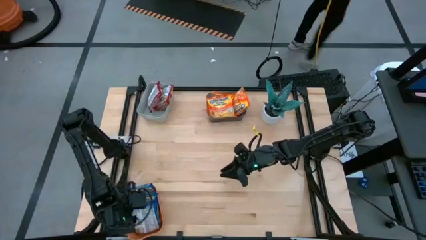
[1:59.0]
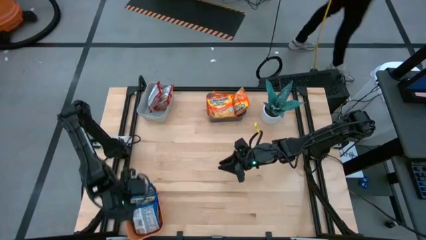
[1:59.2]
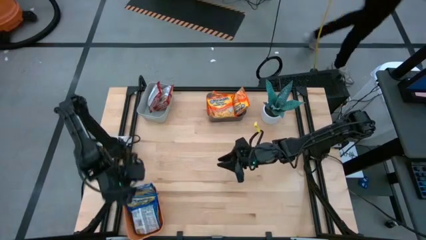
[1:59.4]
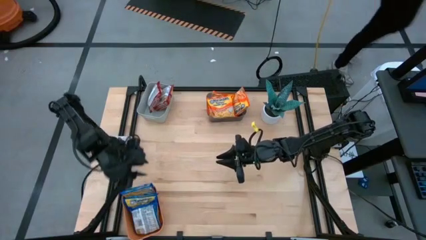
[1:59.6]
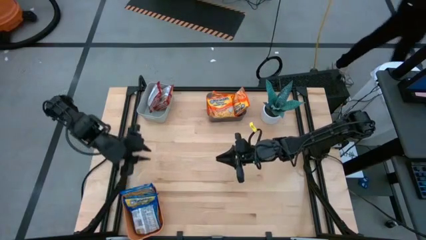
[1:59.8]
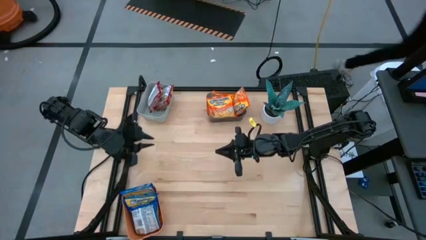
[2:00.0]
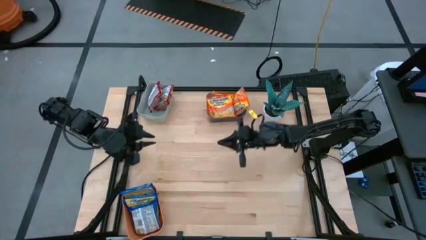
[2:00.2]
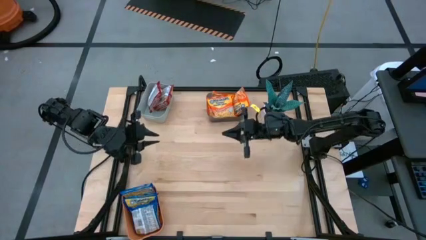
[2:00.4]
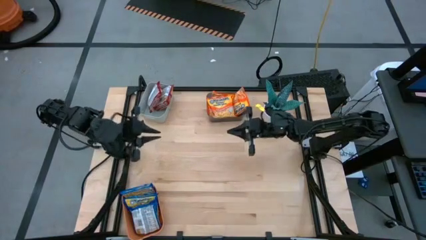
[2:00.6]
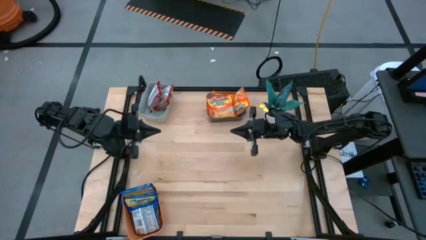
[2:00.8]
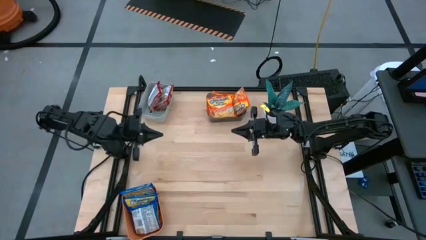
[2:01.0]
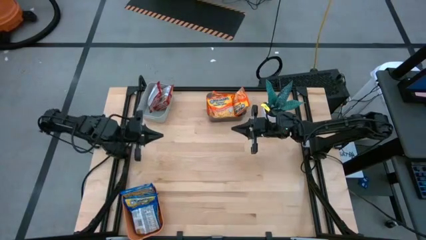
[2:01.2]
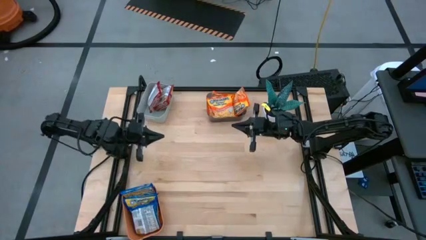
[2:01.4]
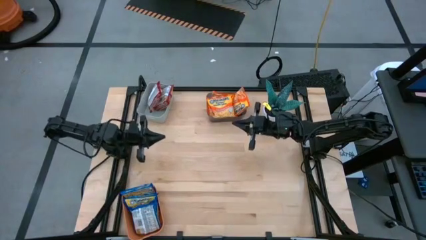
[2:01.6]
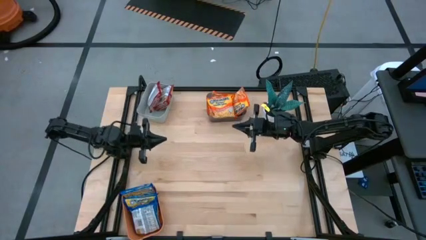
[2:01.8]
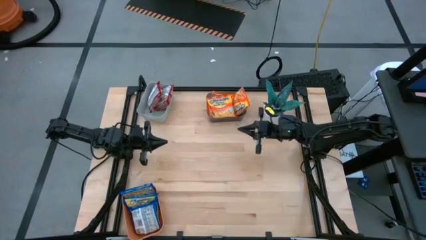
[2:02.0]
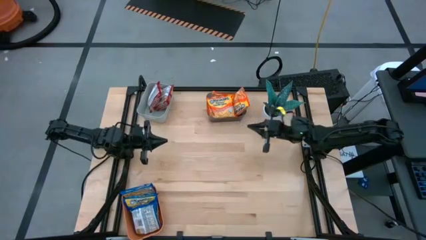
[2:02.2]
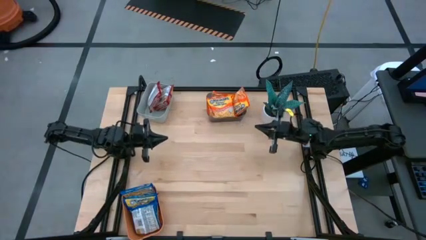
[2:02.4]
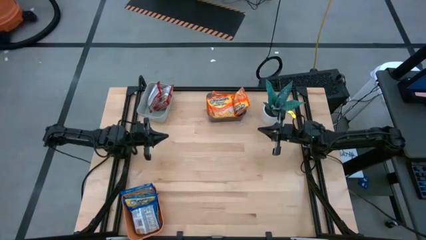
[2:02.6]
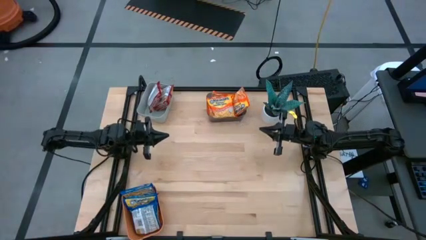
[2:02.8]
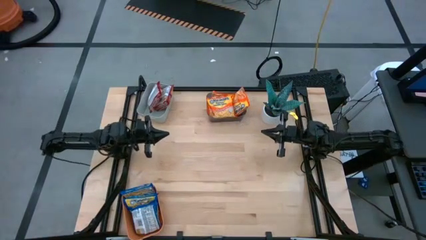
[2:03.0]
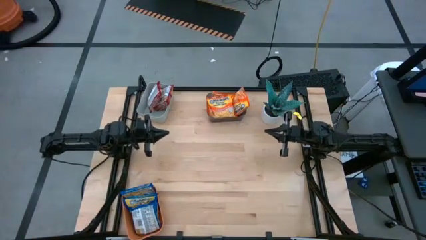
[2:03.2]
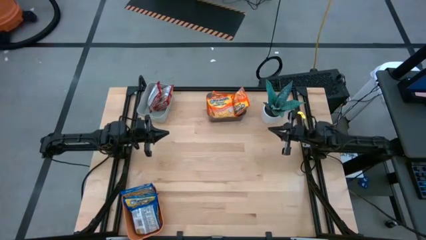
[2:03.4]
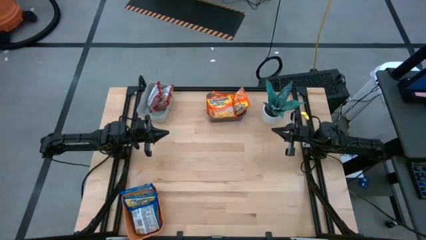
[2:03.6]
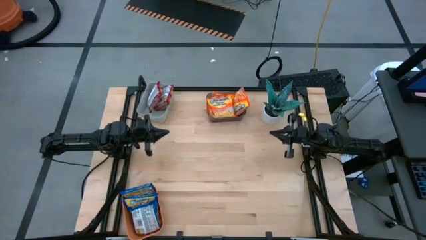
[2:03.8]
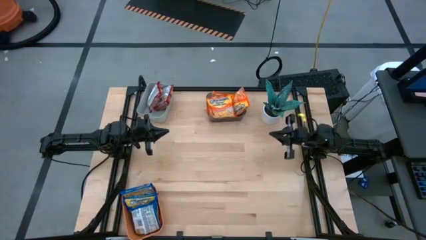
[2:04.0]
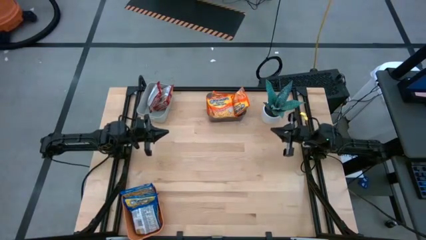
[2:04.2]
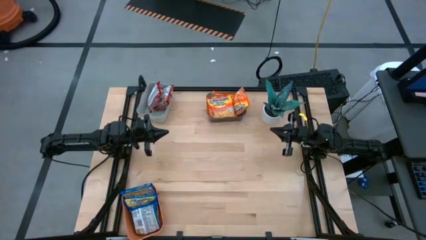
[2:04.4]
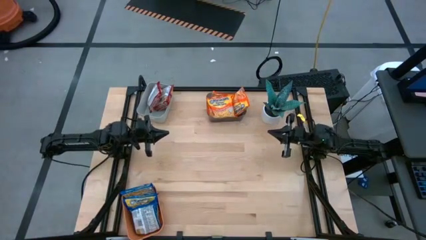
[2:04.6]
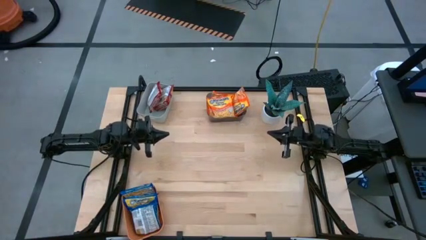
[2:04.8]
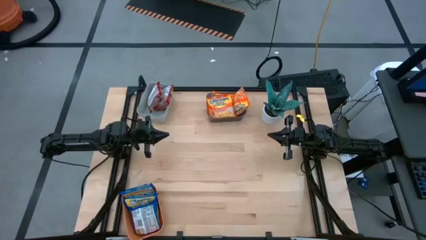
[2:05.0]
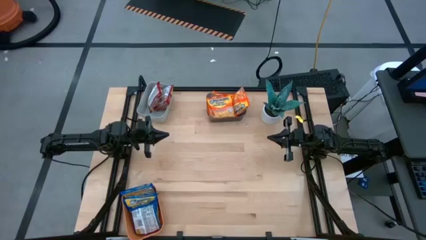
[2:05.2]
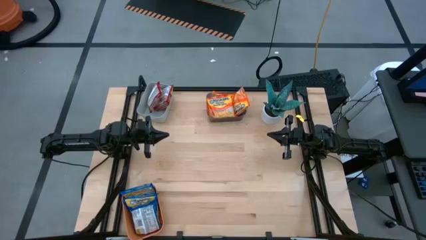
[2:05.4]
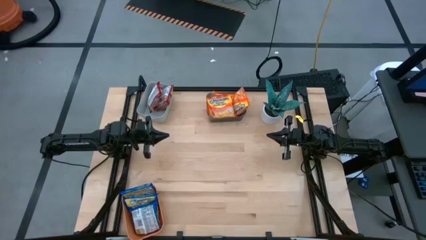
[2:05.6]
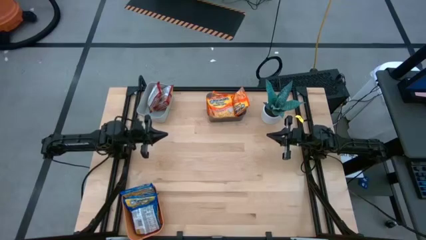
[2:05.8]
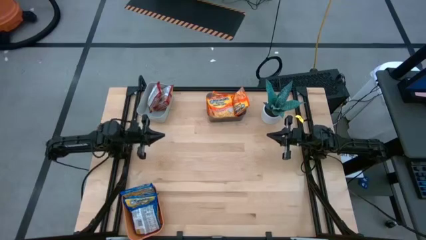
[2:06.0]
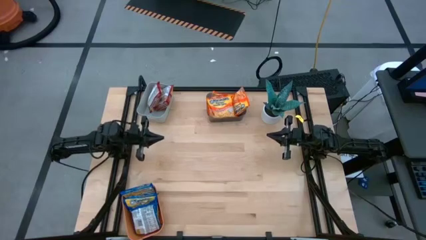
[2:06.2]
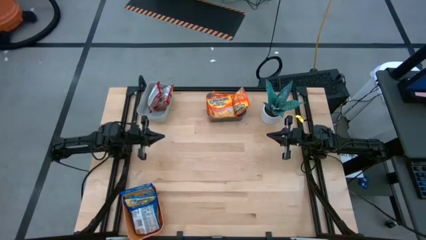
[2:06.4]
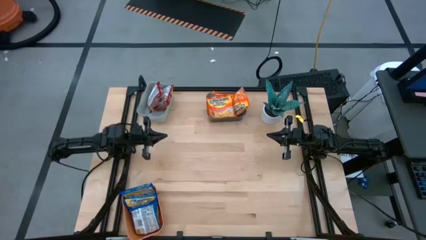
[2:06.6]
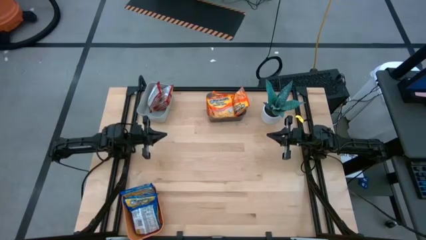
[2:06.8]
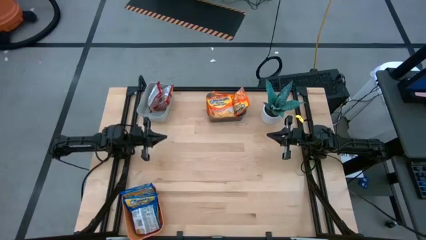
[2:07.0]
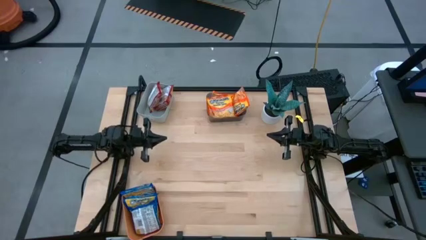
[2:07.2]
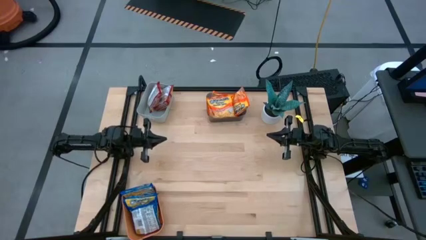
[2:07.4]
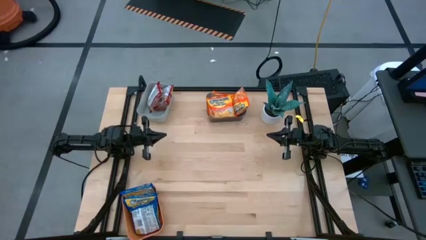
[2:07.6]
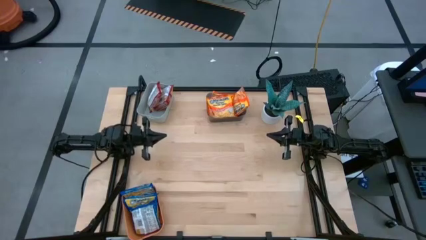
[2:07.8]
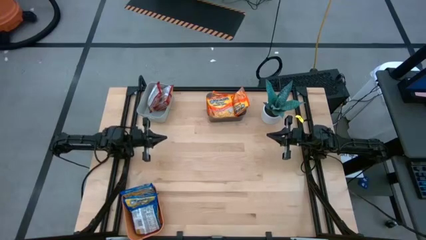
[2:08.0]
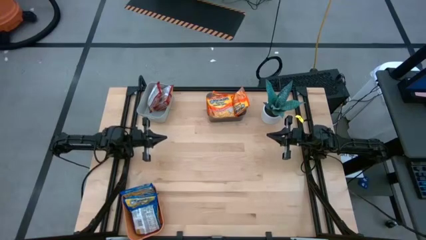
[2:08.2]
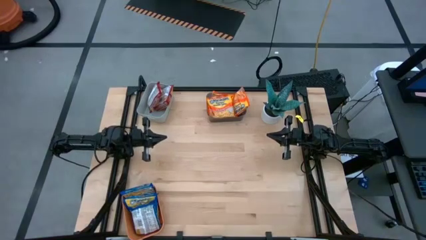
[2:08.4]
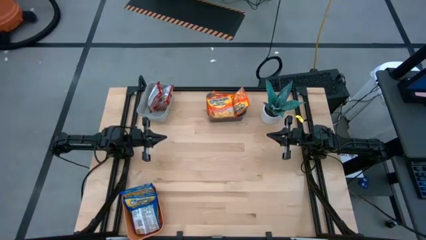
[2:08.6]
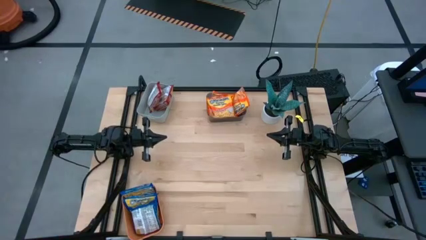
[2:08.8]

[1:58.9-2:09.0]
Task: Sort Maruchan noodles
Return to Home Position

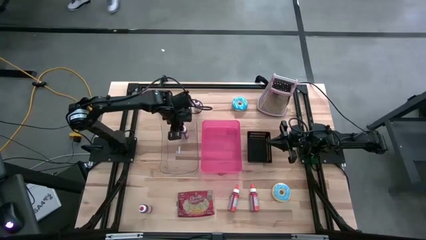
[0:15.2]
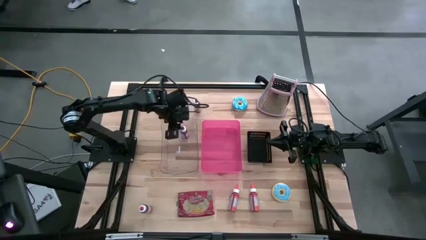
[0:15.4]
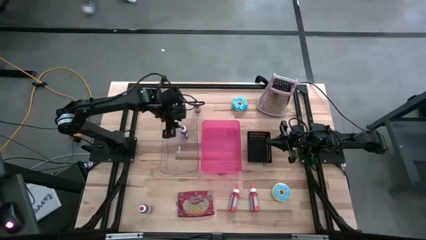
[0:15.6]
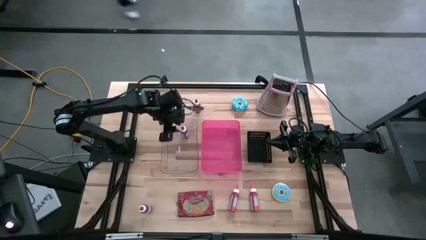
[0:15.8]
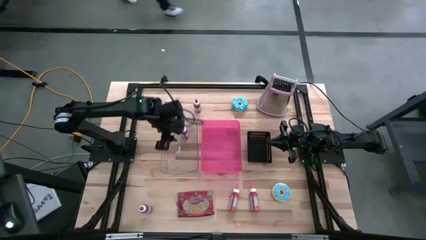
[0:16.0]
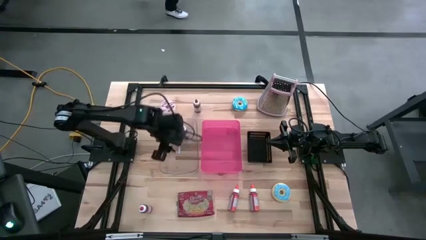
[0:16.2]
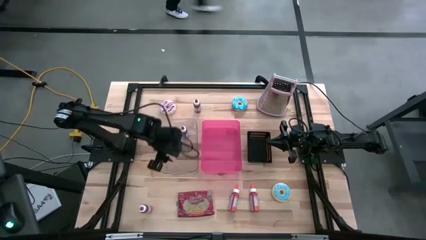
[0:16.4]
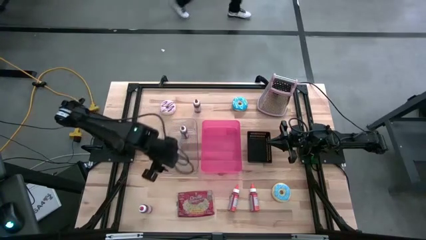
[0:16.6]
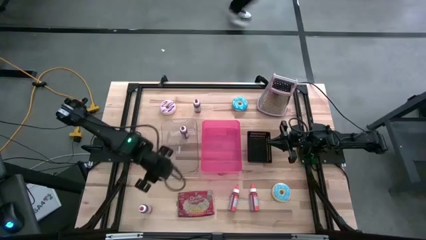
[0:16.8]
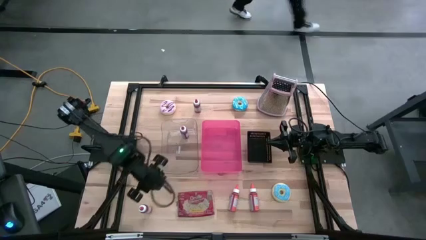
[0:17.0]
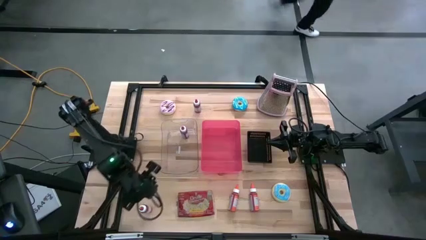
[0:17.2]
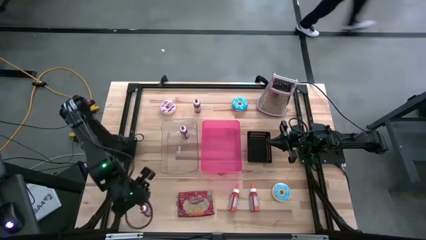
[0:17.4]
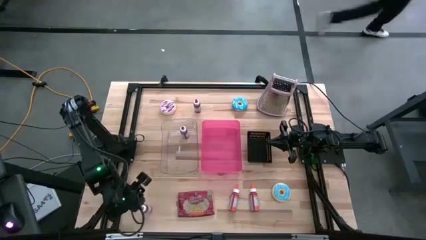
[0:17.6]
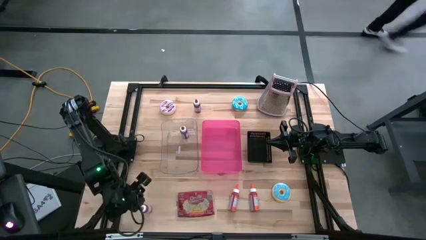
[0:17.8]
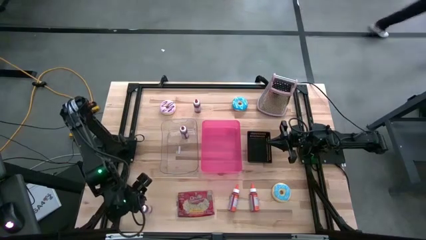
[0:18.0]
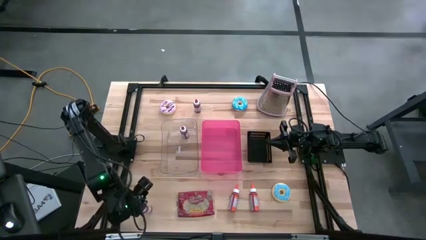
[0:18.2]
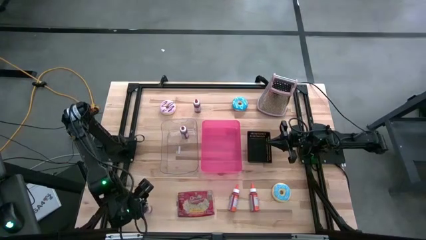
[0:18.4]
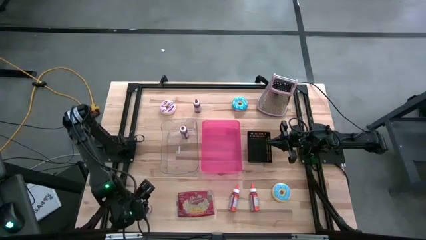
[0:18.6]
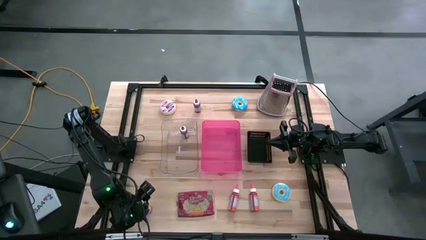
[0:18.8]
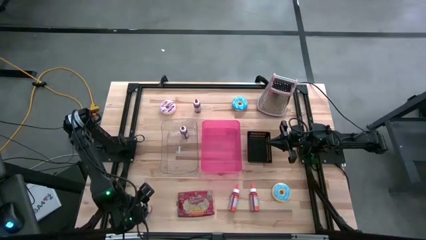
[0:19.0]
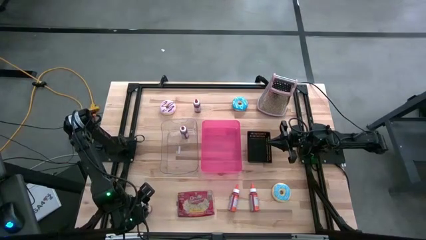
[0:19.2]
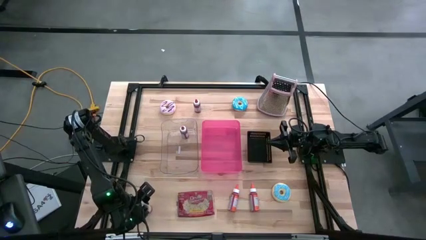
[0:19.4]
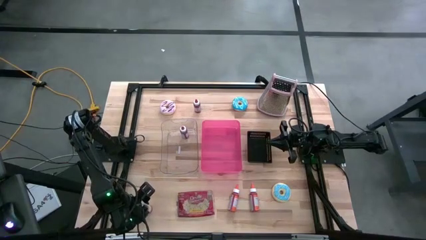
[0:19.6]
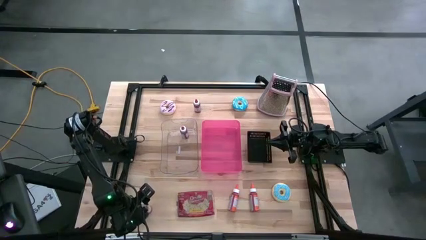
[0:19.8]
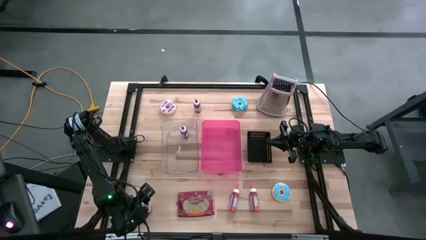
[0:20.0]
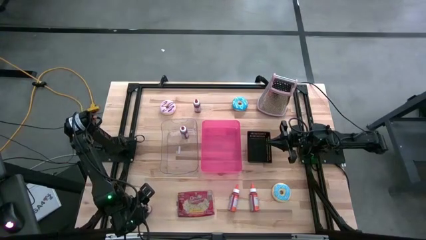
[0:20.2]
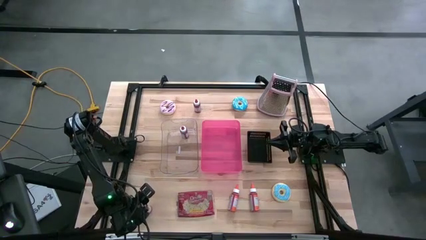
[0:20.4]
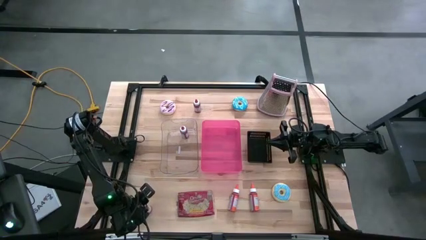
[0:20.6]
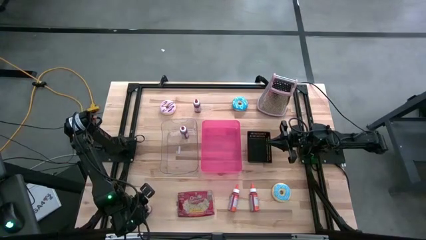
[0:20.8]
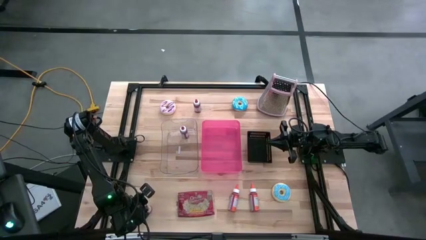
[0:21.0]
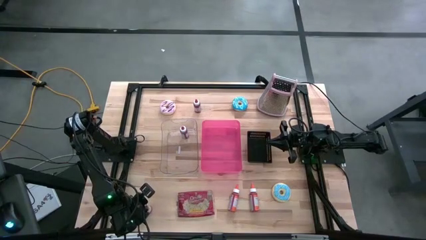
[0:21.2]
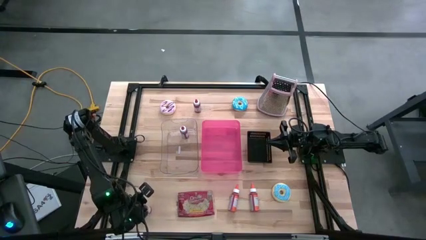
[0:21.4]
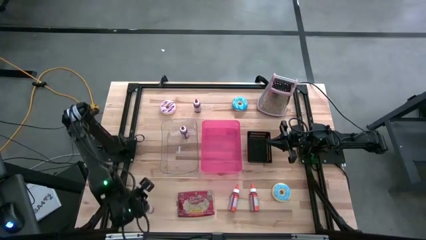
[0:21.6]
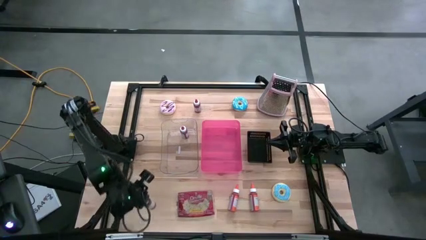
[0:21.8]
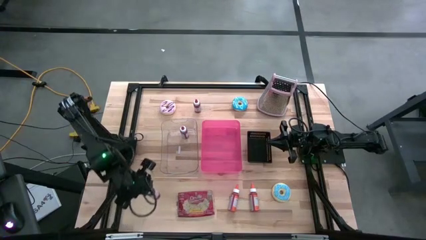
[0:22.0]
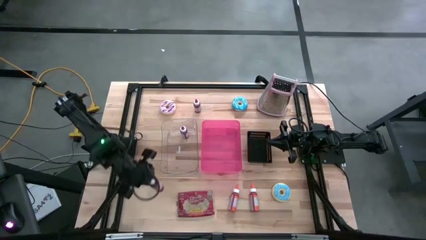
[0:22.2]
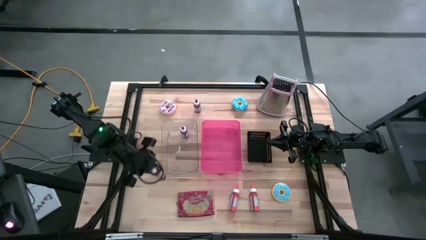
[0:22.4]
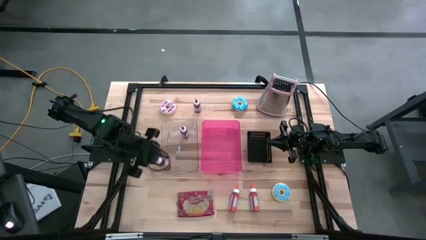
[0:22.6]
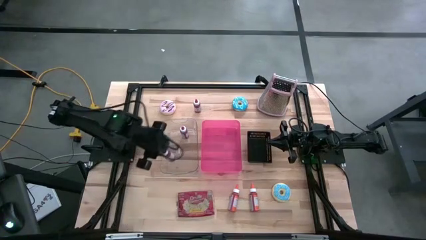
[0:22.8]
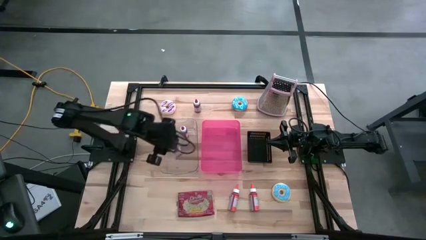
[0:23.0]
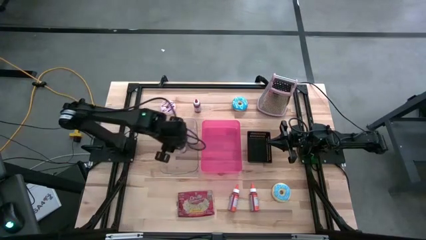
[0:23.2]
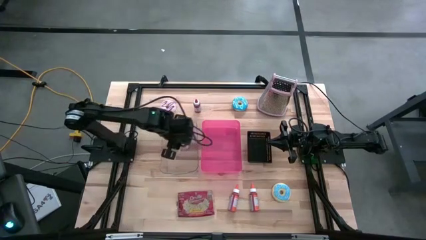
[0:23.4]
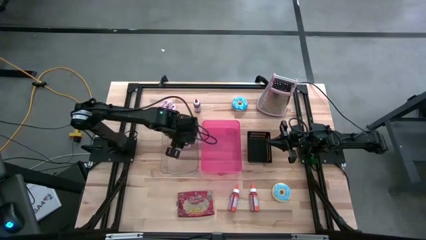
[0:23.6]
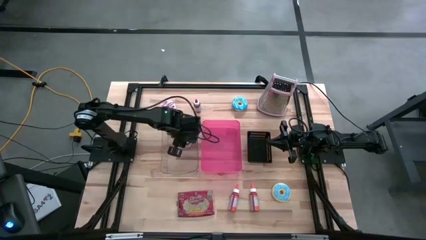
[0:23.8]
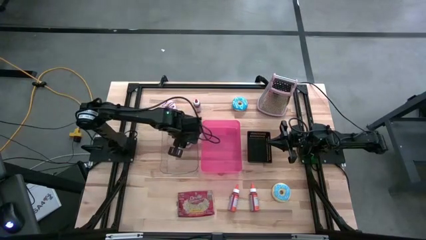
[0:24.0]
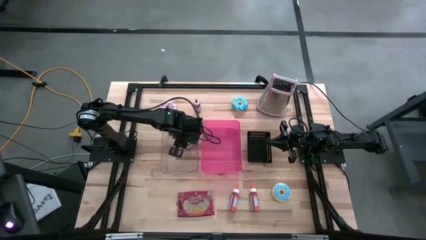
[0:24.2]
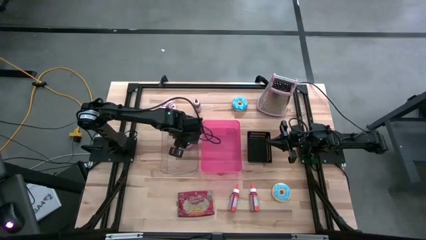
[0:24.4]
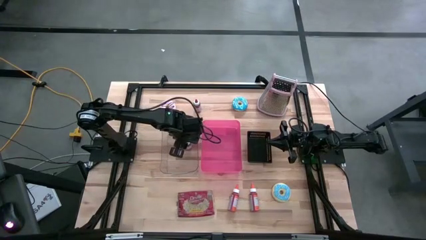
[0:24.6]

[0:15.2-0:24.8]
Task: Pick & Place Food Item
Put the bottom red food coloring bottle into the transparent bin
